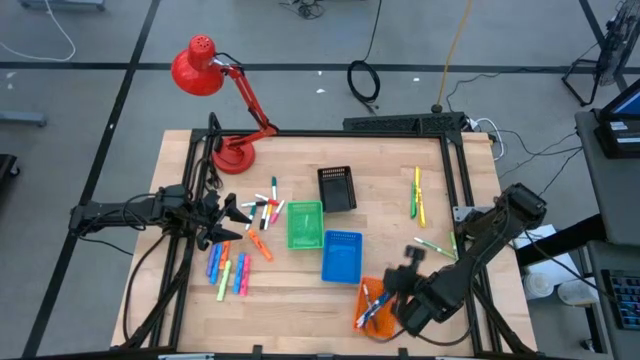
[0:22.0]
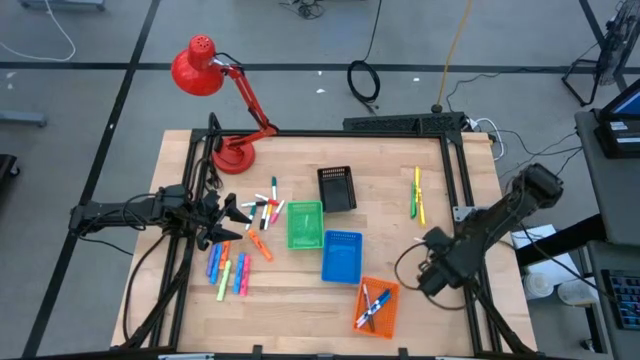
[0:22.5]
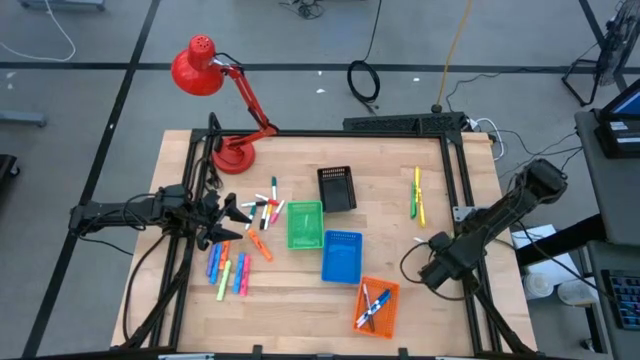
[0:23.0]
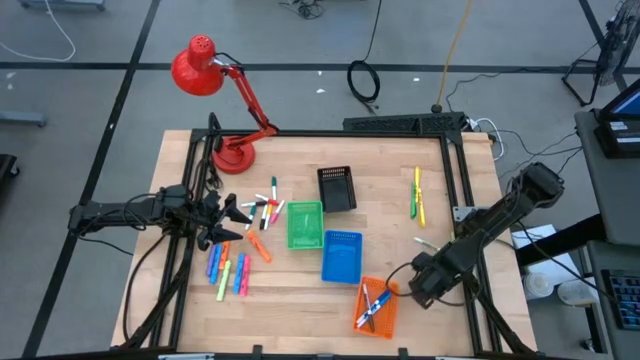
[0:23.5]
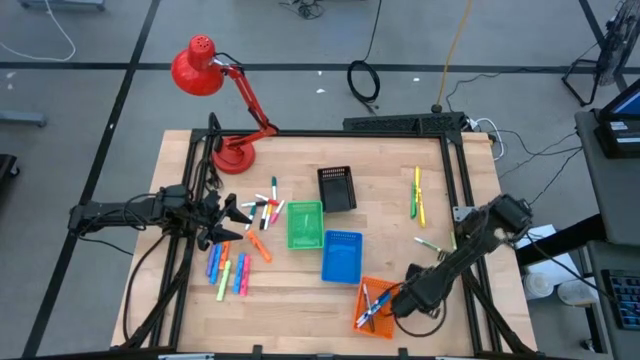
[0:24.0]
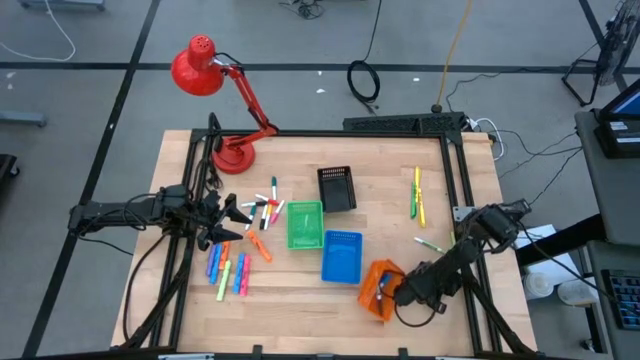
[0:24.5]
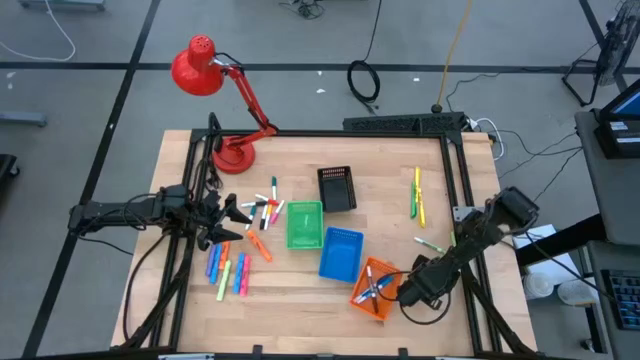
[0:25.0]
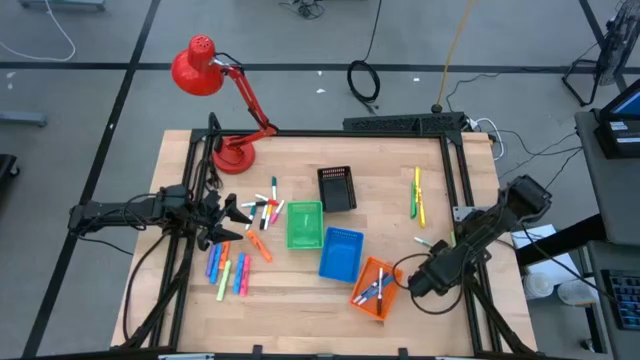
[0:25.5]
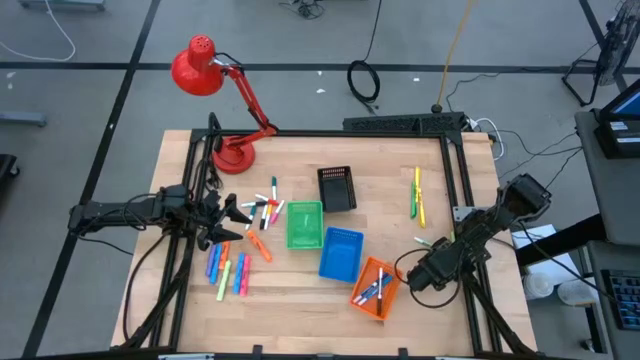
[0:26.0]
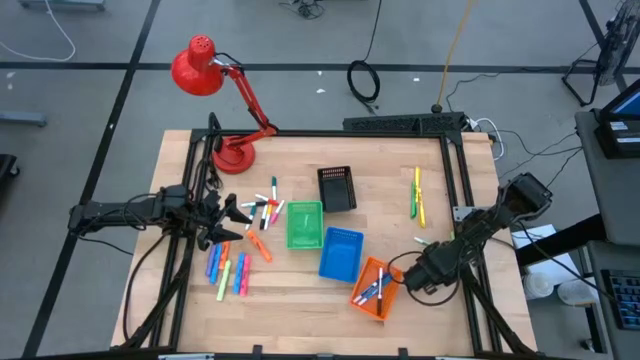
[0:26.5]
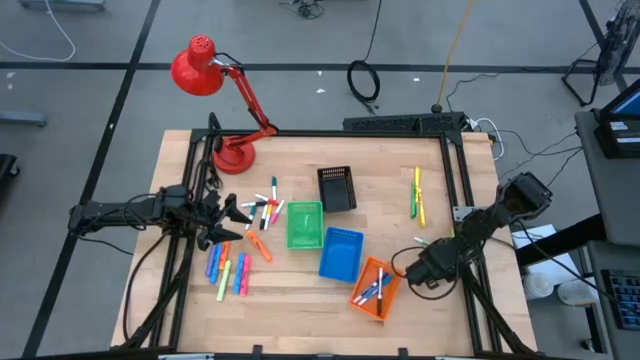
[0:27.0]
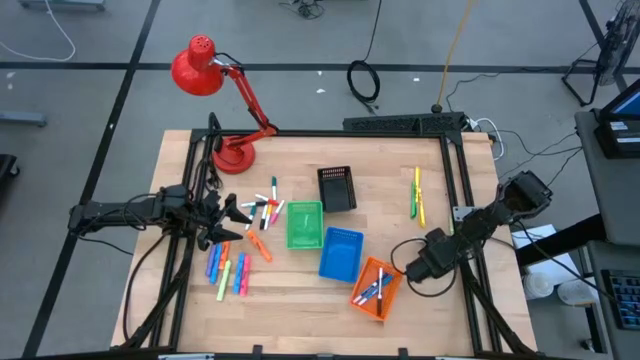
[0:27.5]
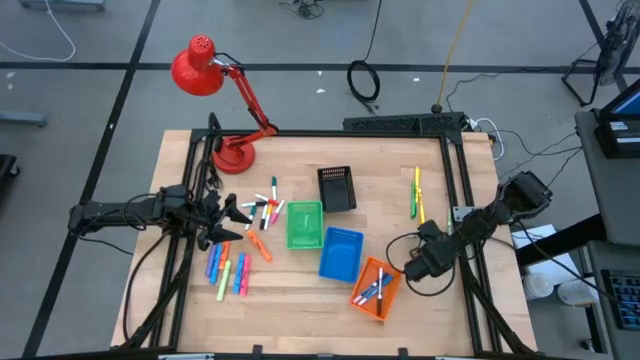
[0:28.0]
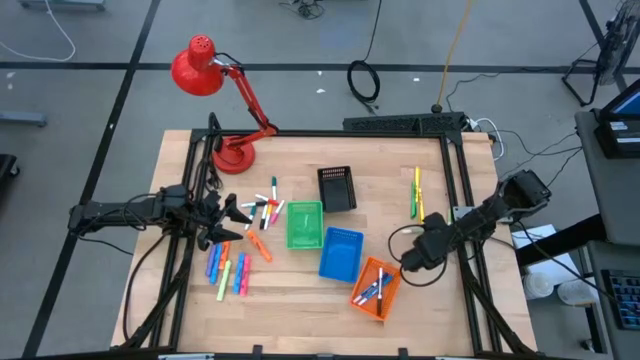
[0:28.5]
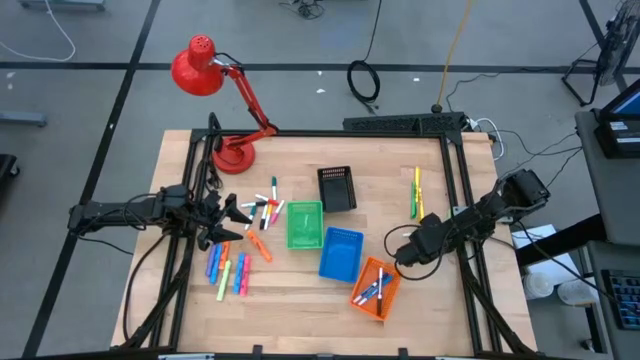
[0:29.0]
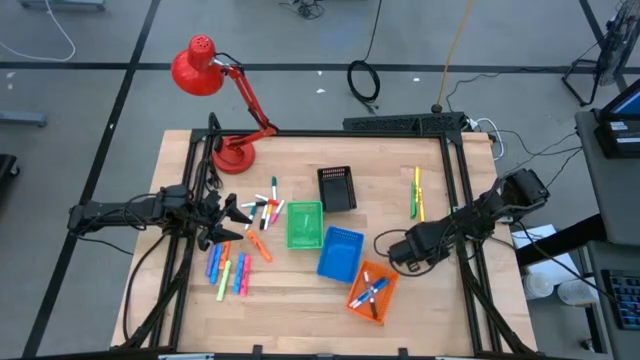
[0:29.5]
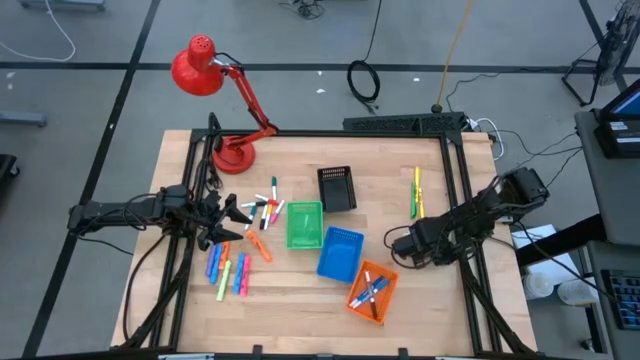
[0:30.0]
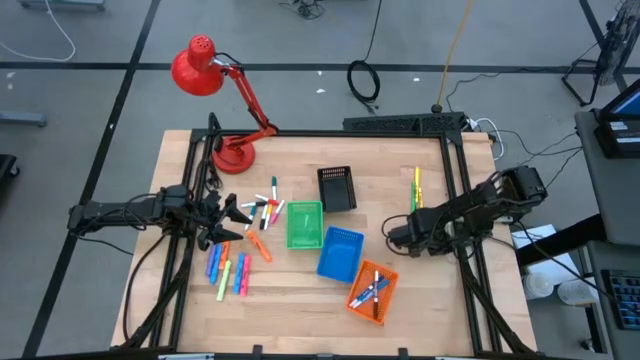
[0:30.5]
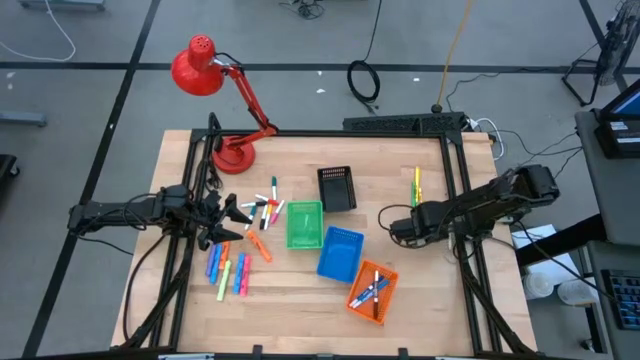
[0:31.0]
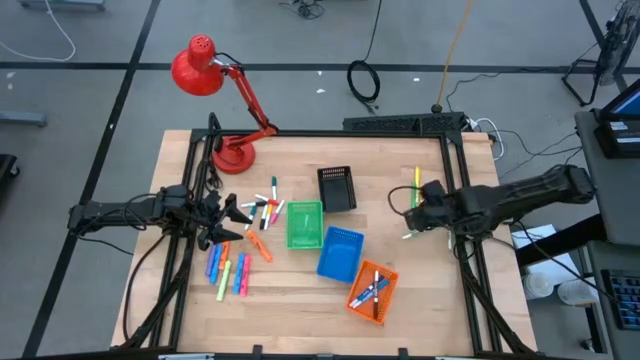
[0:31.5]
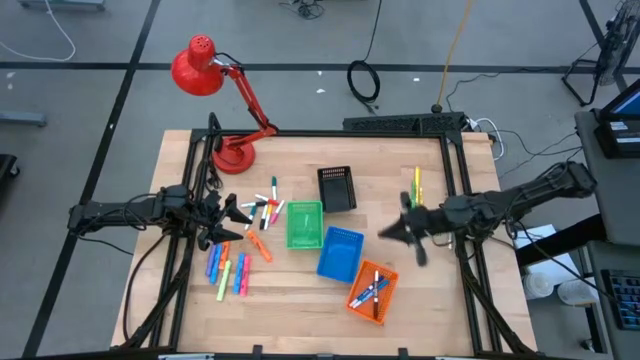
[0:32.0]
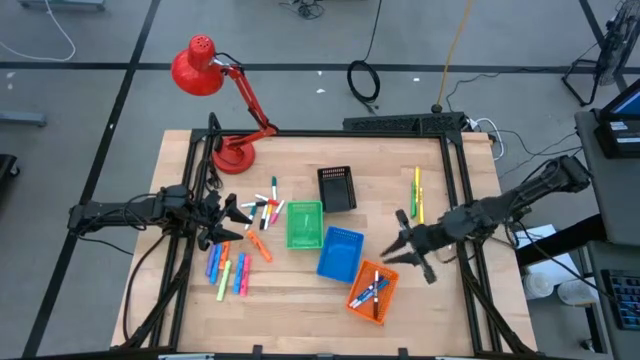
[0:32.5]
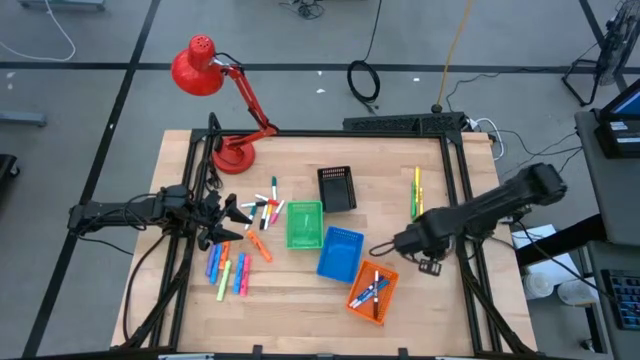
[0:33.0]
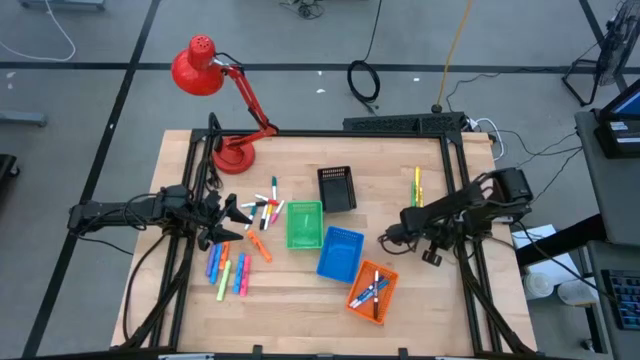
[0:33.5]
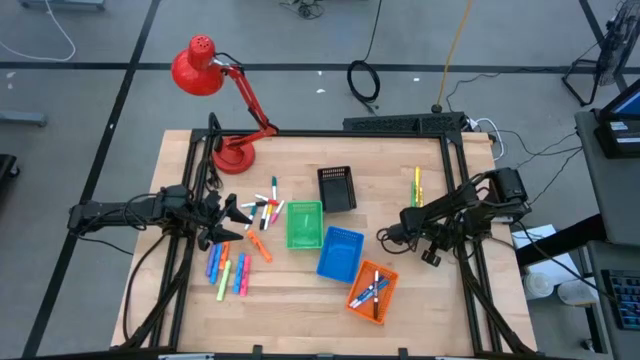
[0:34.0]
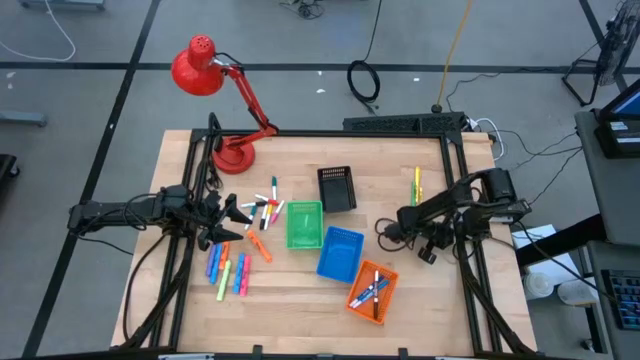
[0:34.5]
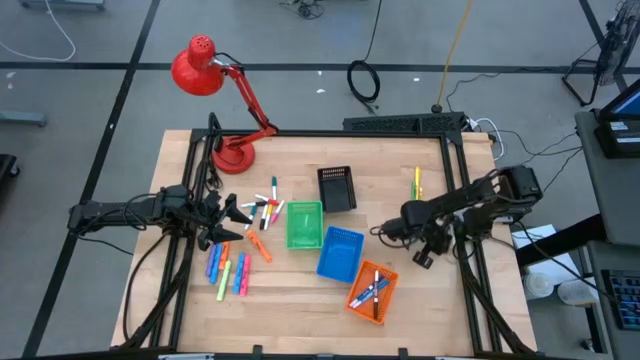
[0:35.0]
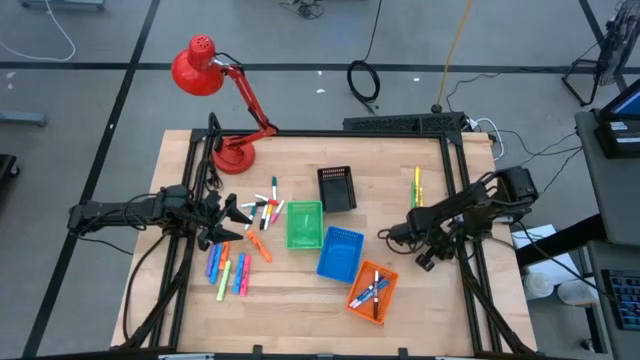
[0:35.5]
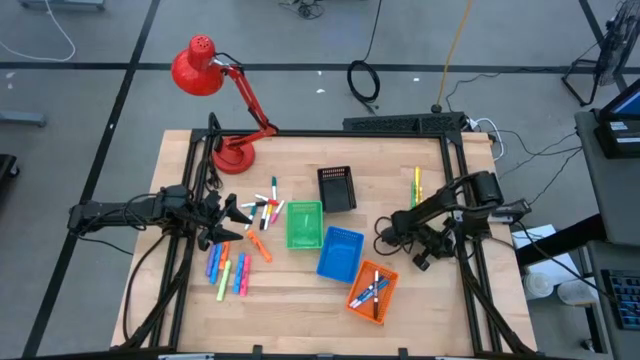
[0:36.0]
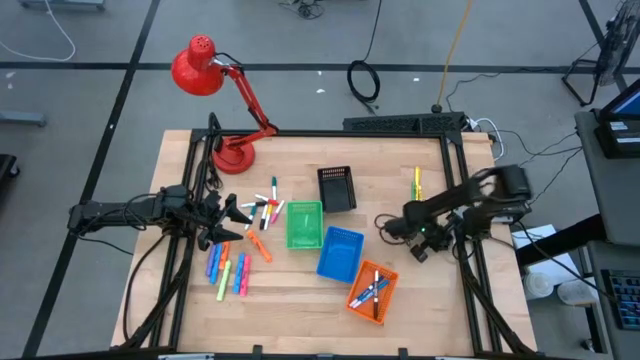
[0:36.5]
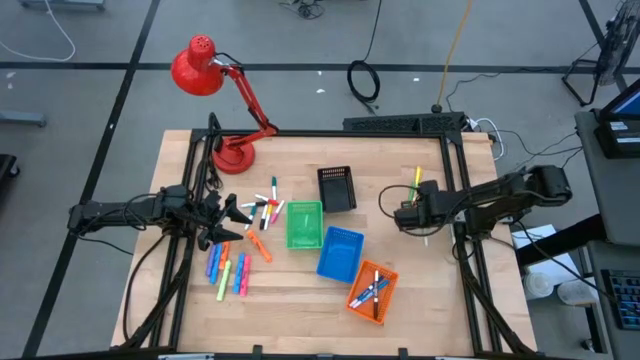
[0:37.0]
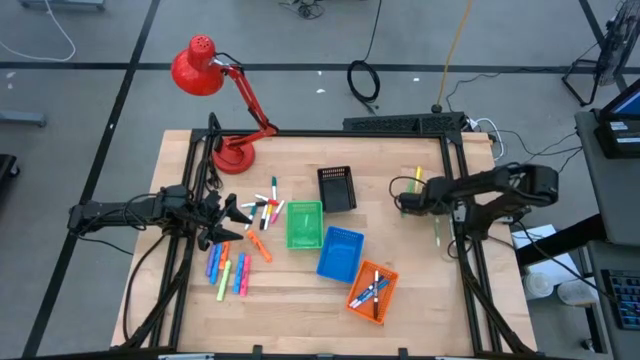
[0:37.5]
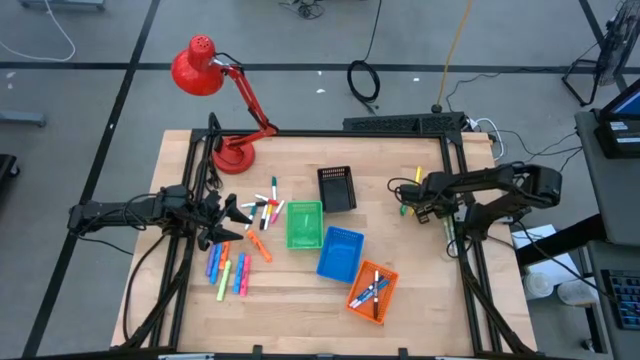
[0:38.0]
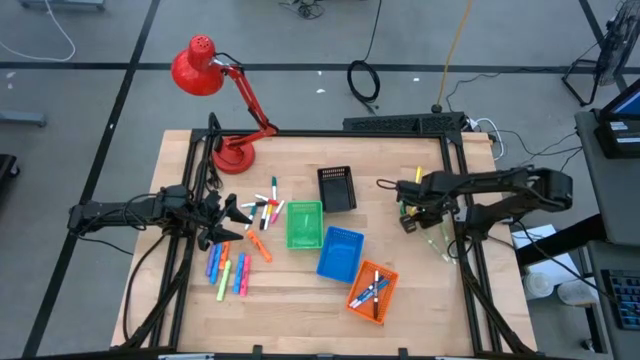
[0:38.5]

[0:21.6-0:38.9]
Task: Pick & Place Markers
Put the right green marker pen into the orange basket

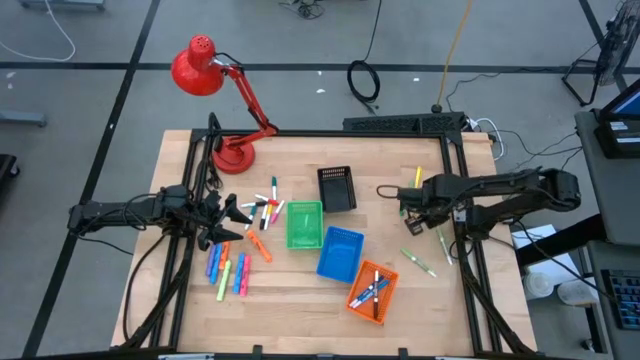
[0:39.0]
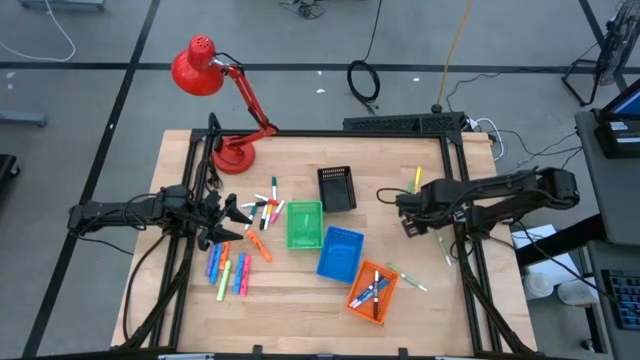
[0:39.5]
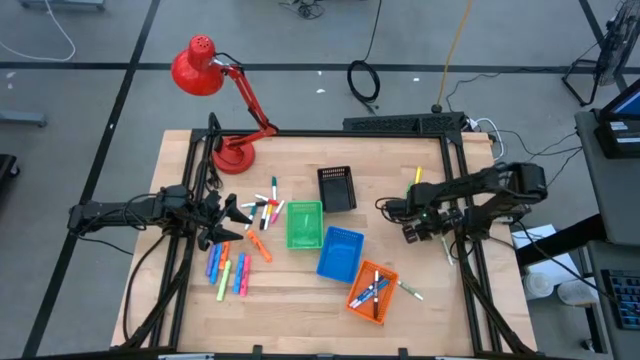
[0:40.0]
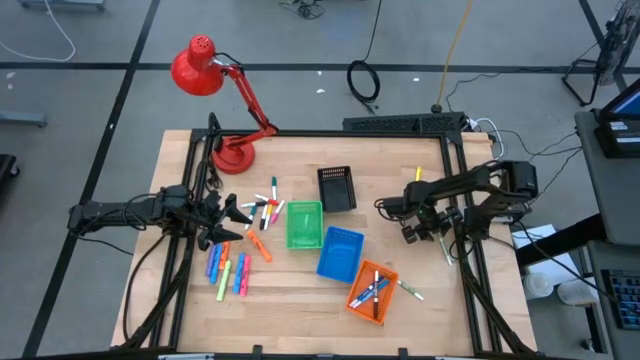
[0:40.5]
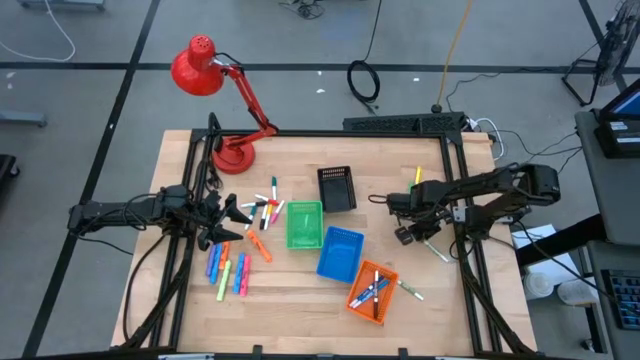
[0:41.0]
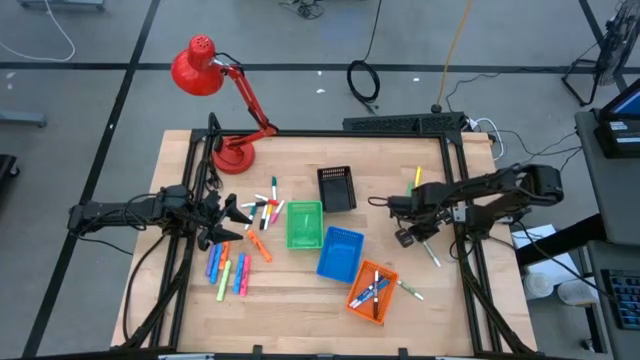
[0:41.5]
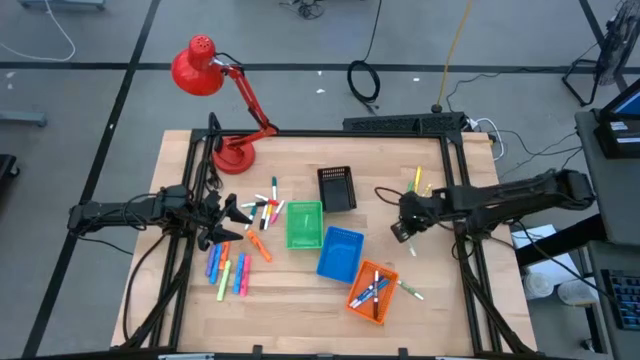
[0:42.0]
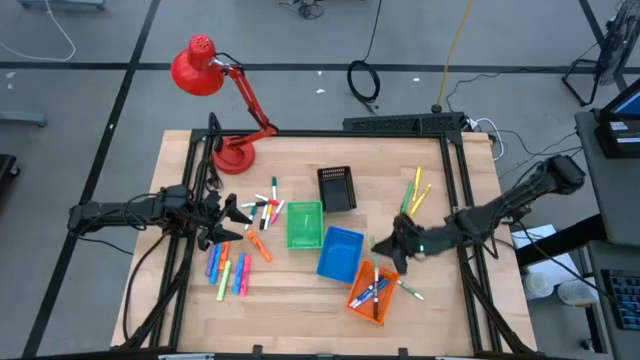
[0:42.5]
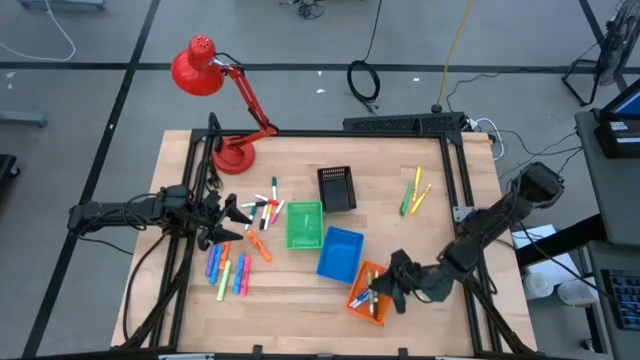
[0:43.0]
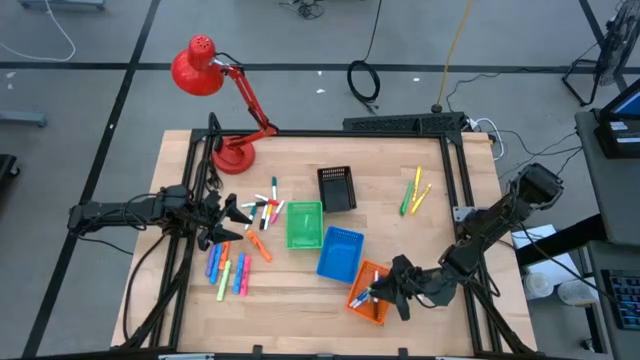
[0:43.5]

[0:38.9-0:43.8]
Put the top green marker pen into the orange basket
